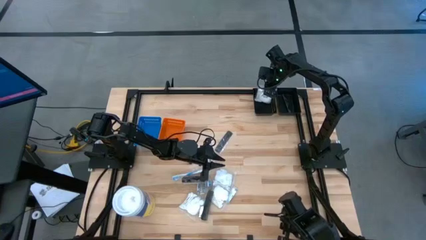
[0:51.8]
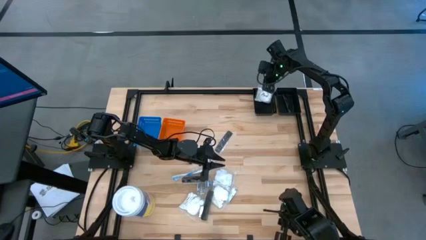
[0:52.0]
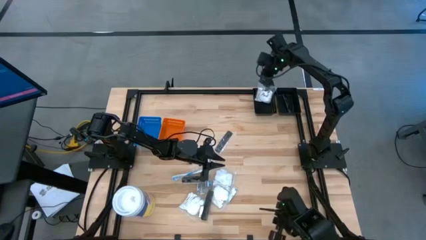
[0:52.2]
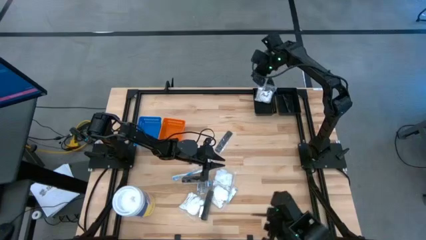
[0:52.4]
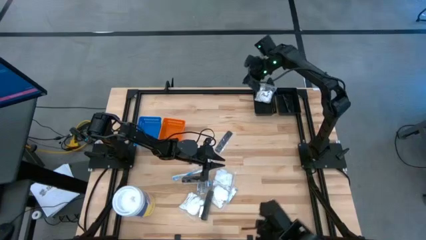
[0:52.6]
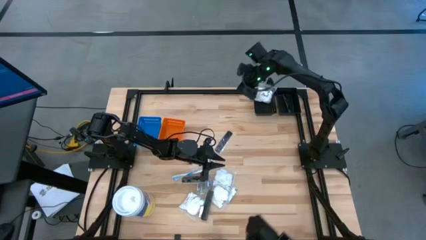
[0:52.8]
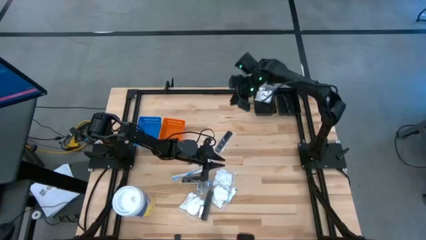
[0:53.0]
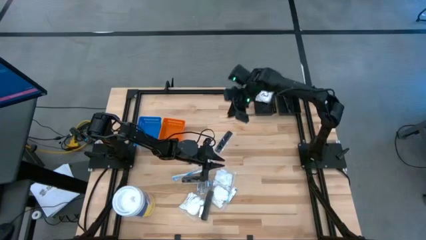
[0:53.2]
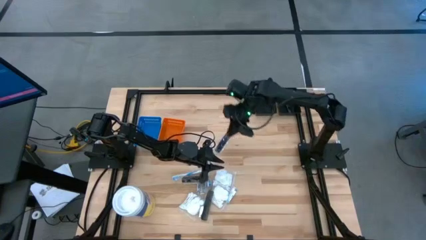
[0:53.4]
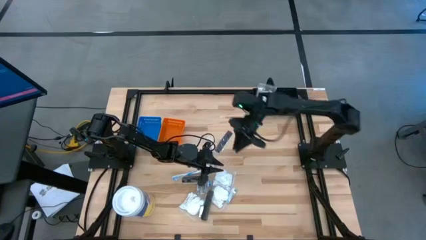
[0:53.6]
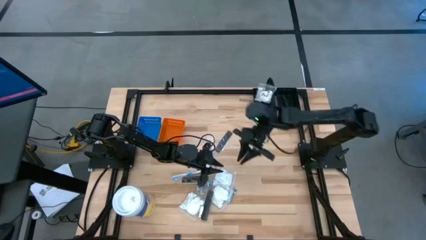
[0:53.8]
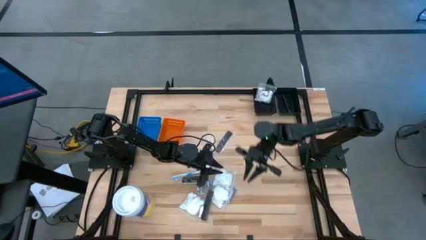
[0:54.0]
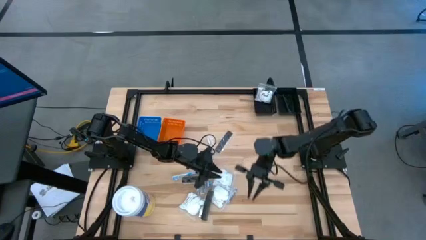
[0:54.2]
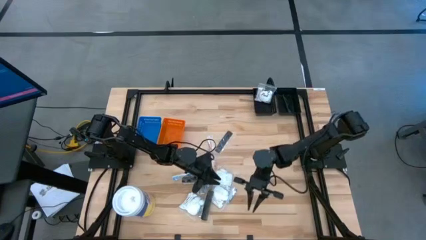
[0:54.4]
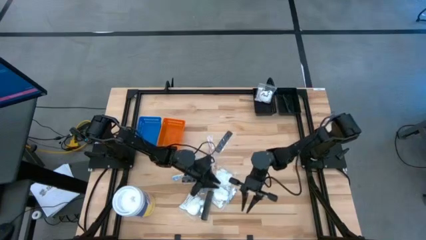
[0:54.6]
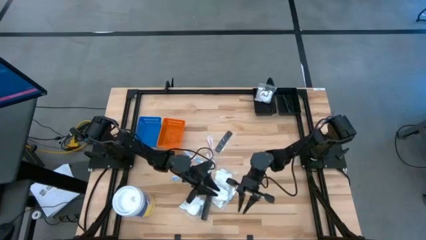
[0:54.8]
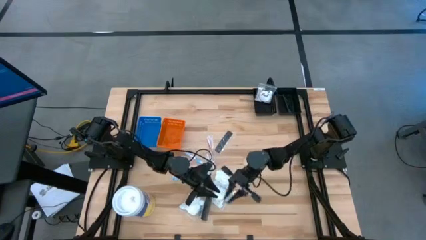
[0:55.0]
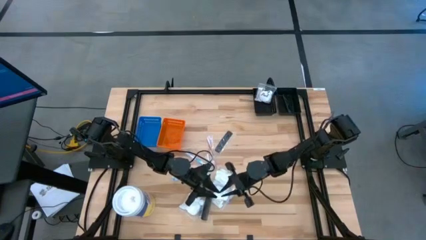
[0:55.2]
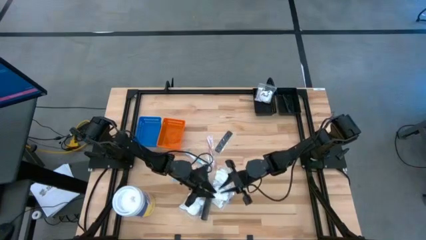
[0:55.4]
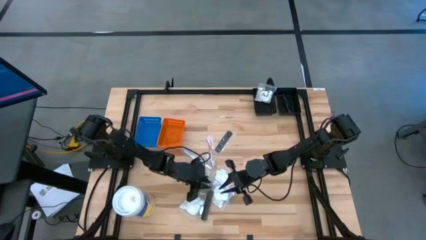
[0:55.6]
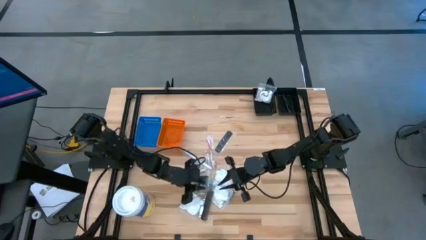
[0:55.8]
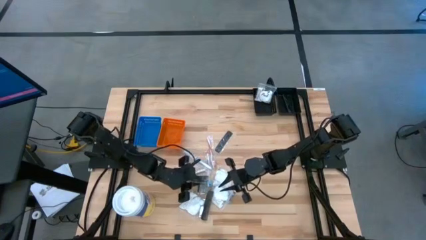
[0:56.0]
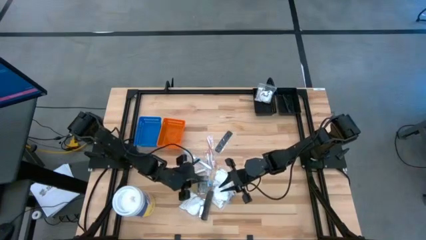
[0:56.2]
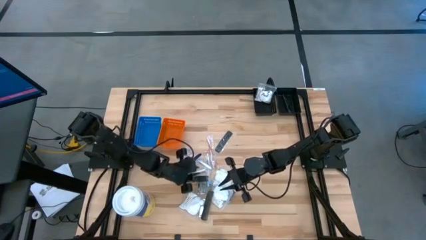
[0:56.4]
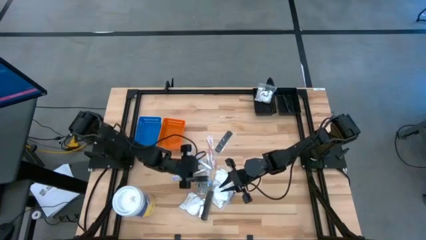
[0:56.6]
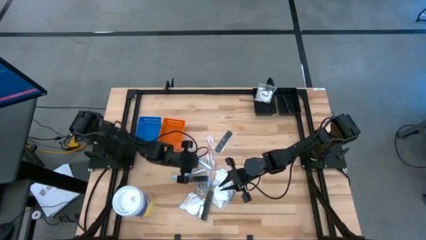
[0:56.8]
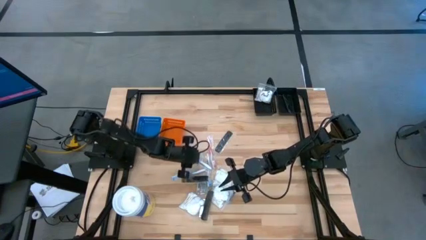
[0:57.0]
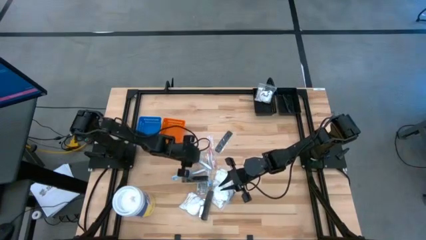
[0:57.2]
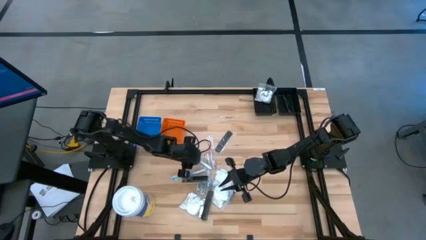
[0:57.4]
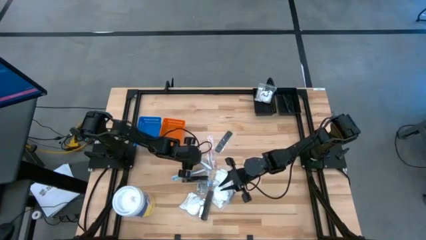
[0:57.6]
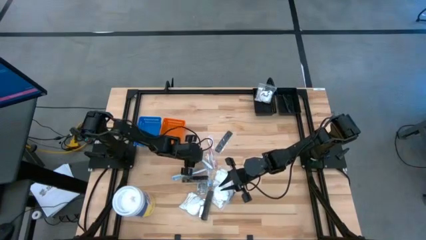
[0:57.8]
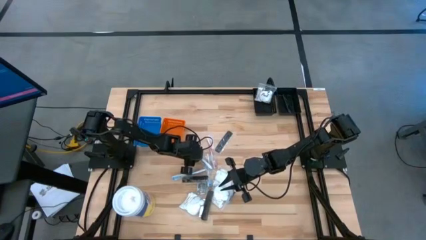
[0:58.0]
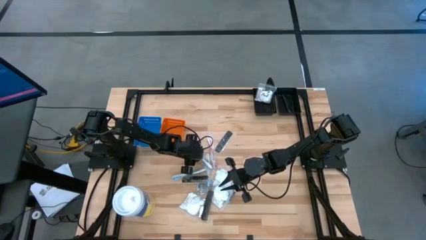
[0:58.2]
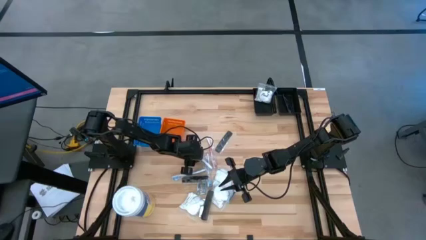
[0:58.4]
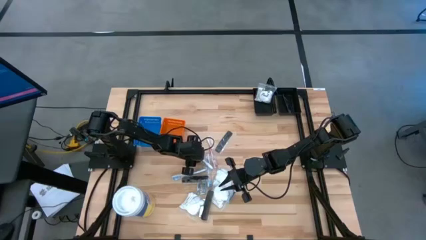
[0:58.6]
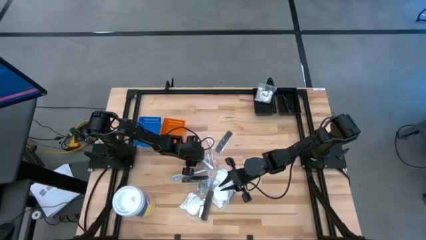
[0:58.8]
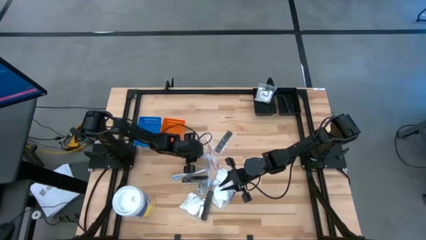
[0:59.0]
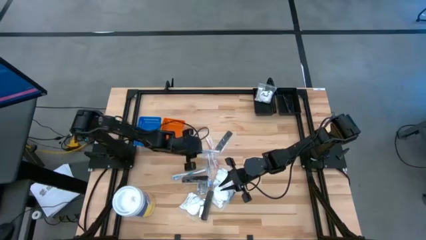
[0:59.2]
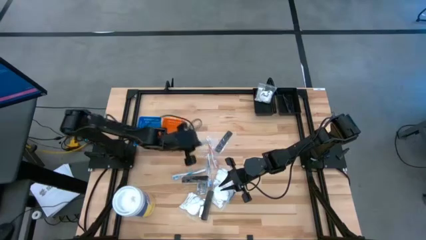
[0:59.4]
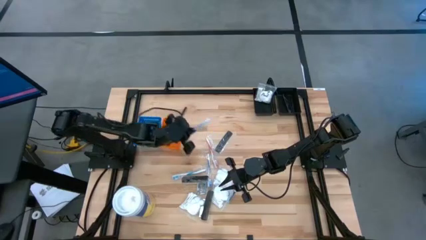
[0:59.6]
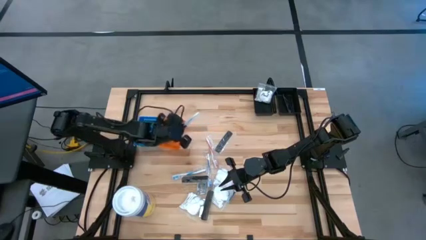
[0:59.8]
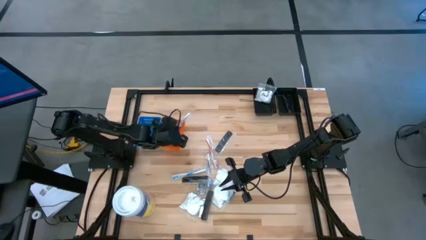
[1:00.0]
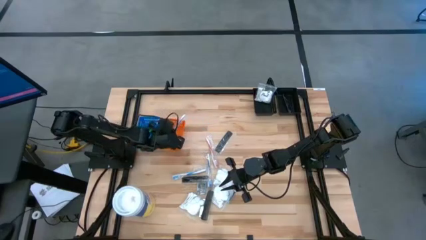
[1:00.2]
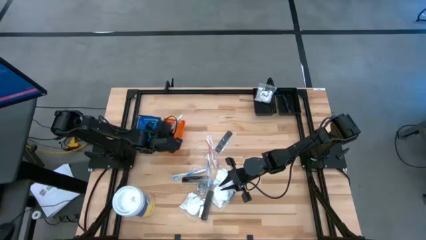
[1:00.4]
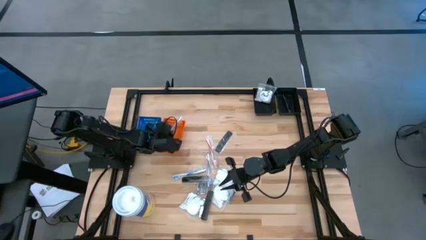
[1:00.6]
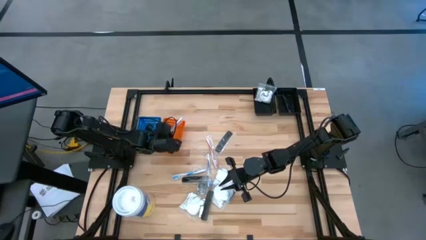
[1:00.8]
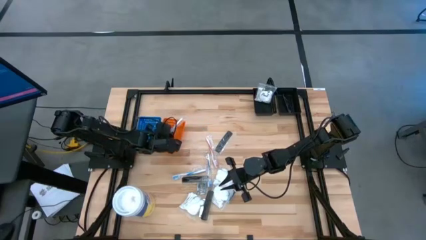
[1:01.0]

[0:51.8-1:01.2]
Task: Pick & Place Travel size toiletries
Put the blue toothbrush into the orange bin

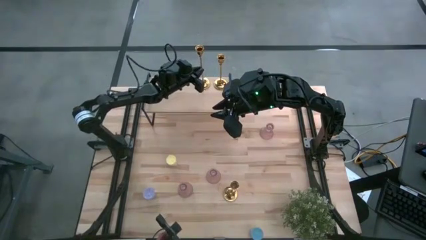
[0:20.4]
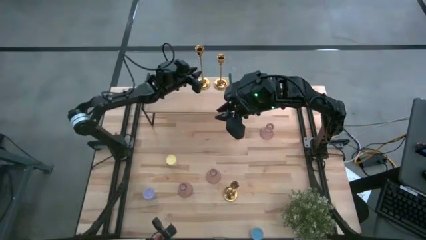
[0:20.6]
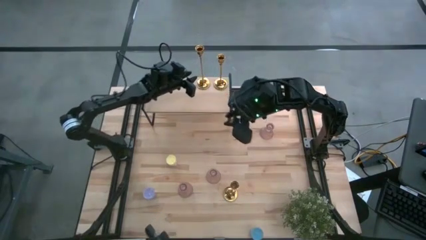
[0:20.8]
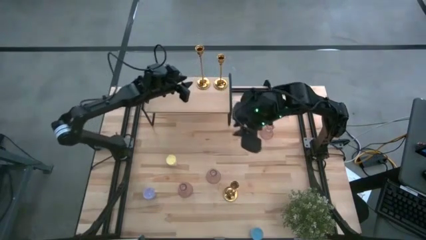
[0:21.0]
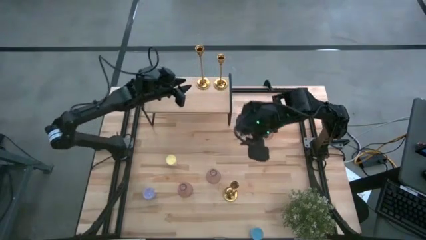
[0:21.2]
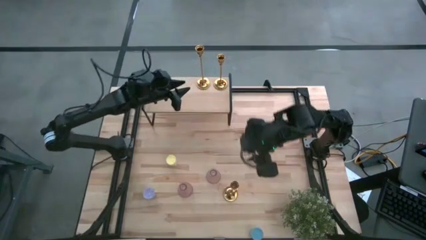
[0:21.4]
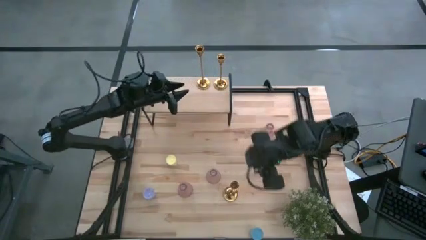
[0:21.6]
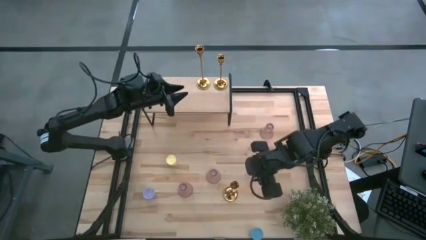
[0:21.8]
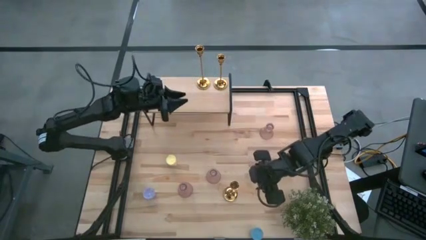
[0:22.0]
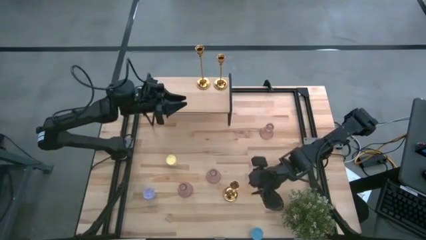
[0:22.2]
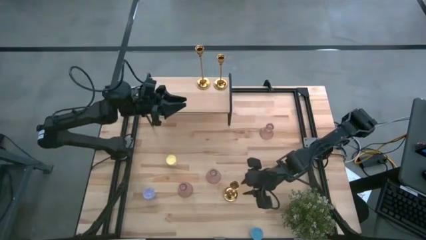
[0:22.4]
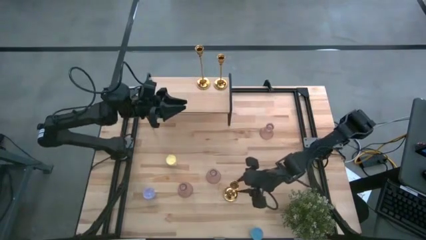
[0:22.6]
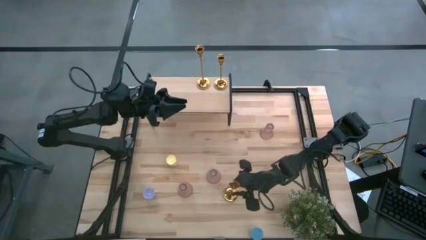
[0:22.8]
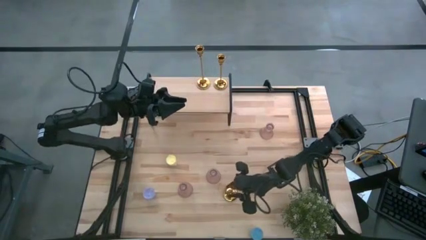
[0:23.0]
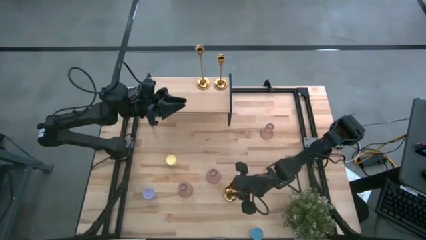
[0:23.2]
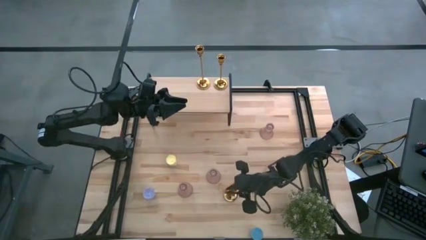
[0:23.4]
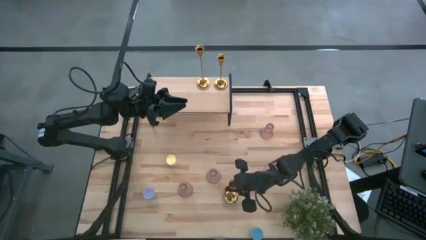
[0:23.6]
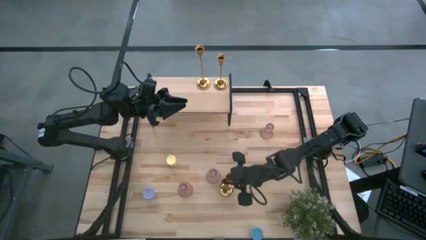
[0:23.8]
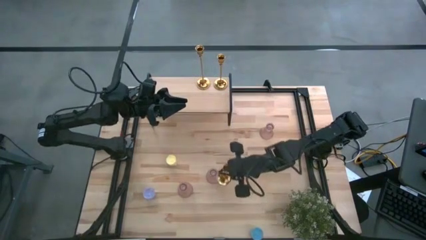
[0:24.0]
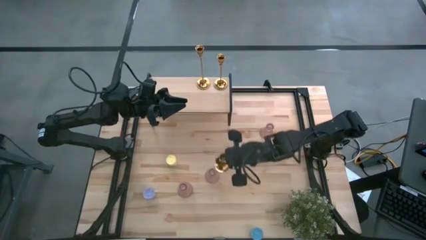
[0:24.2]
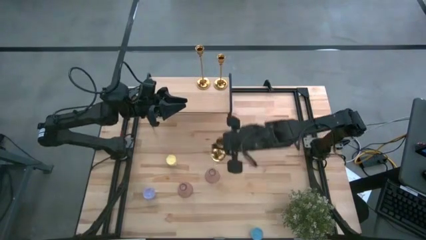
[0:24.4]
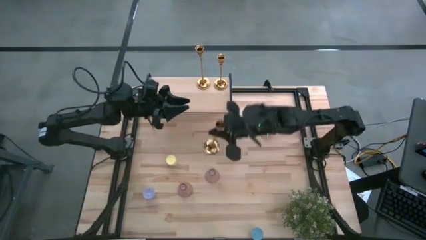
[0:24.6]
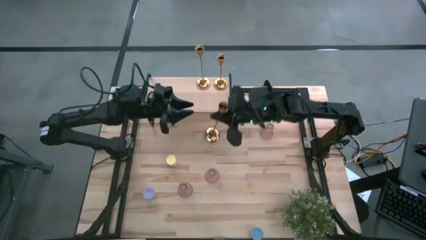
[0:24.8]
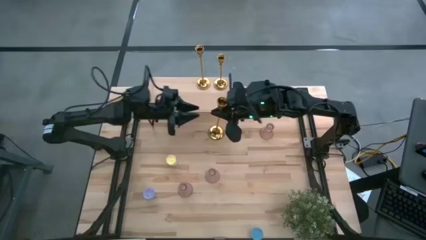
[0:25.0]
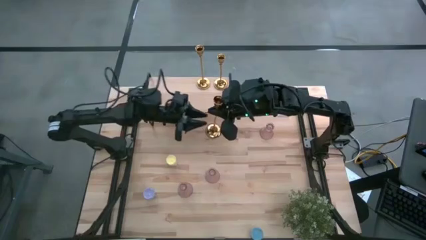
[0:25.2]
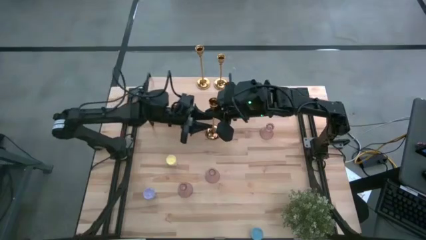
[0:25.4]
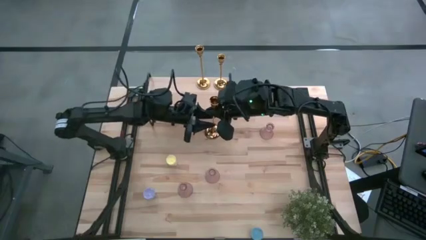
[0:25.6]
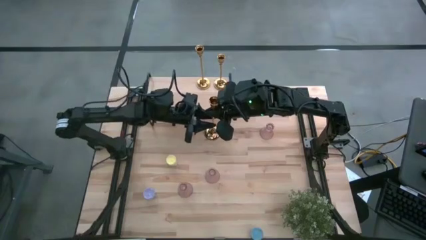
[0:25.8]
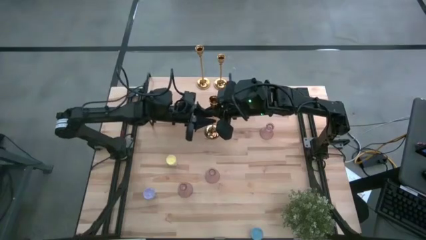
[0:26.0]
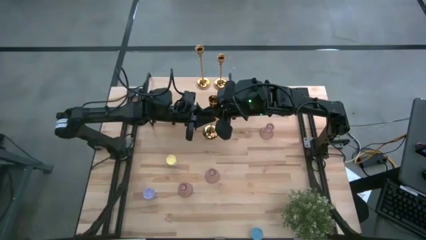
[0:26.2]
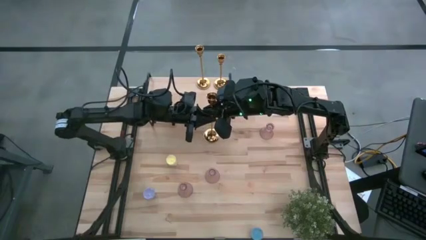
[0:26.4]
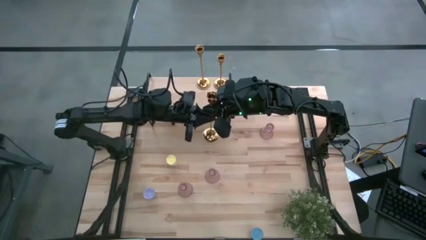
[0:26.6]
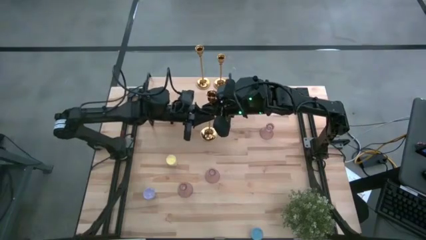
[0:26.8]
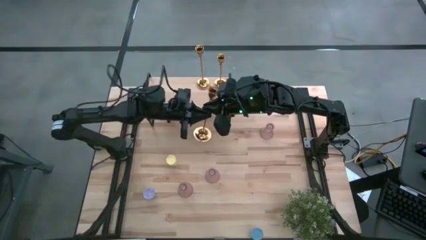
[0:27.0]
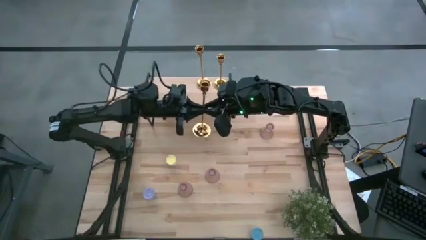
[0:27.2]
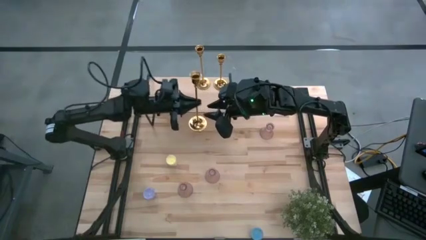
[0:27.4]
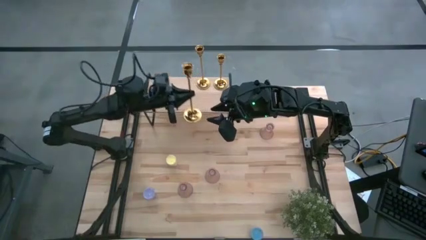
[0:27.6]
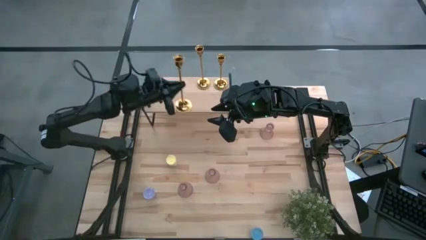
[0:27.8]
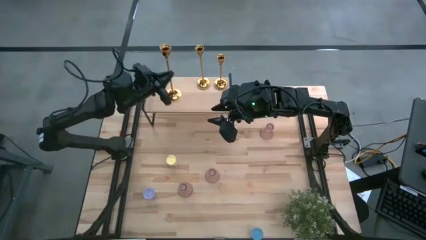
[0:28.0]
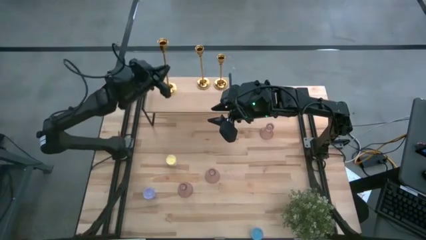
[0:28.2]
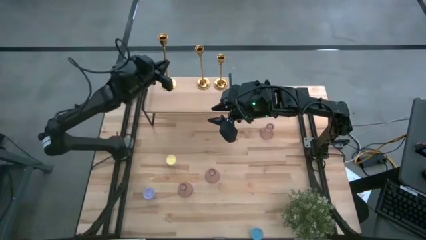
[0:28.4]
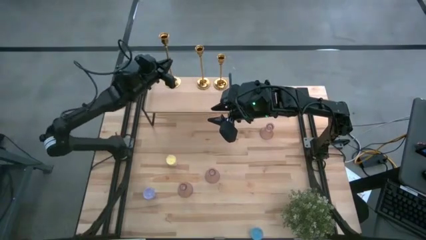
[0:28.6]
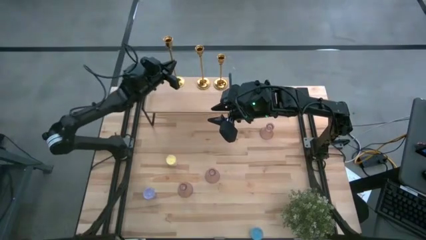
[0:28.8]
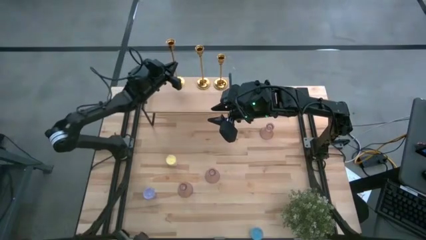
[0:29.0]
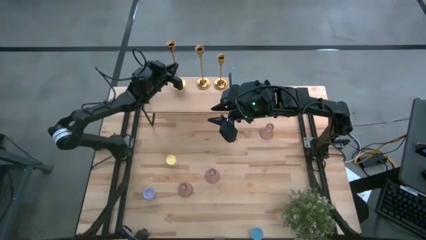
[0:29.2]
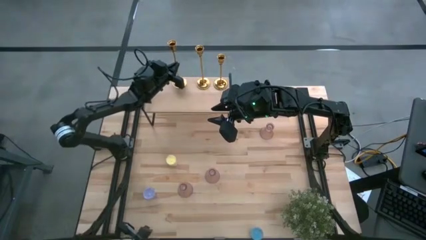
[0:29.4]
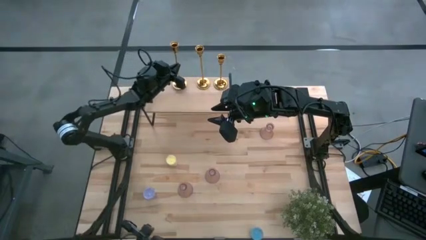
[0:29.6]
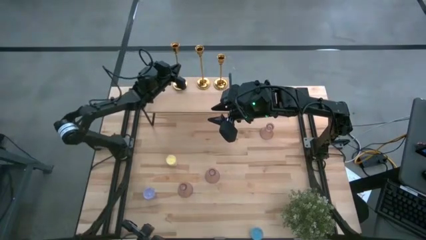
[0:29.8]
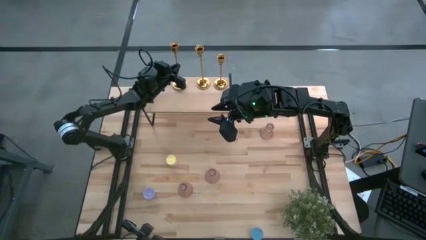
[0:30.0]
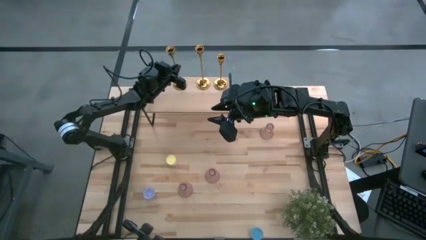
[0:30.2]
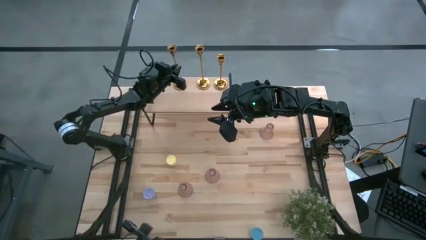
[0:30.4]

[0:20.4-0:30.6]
Task: Pick & Place candle stick holders
Put the gold candle holder on the shelf aligned with the gold candle holders
